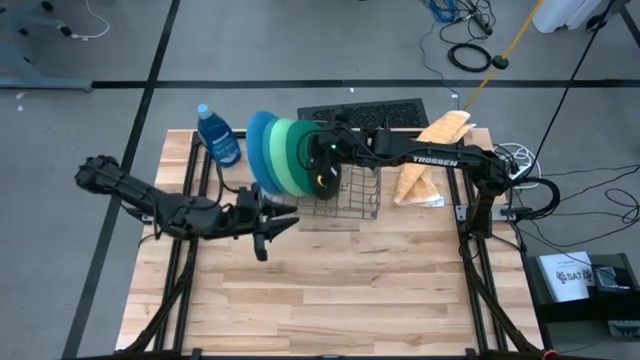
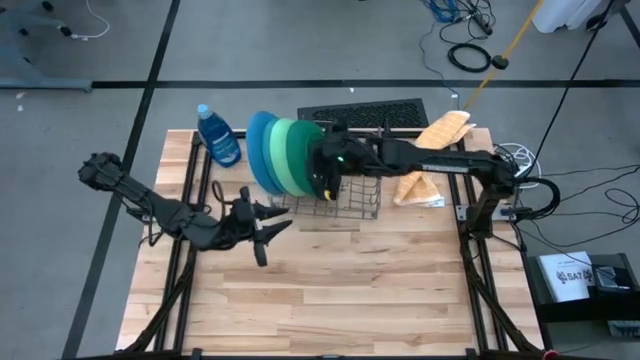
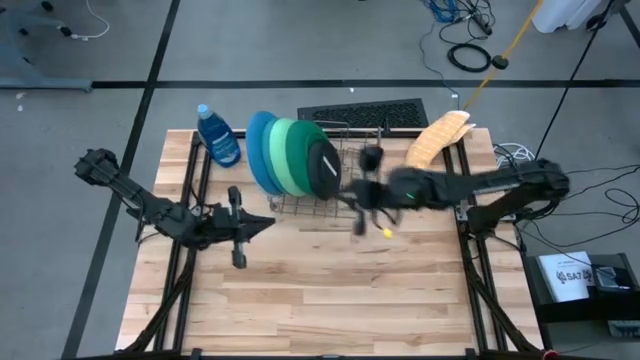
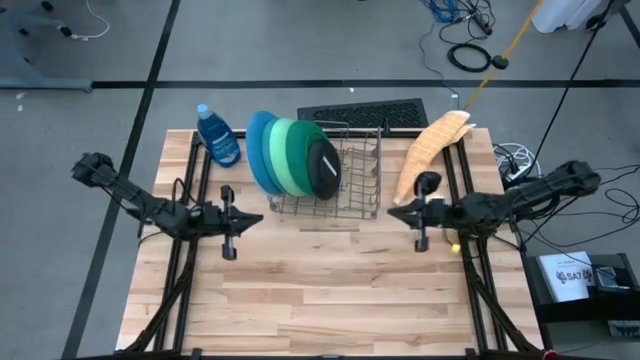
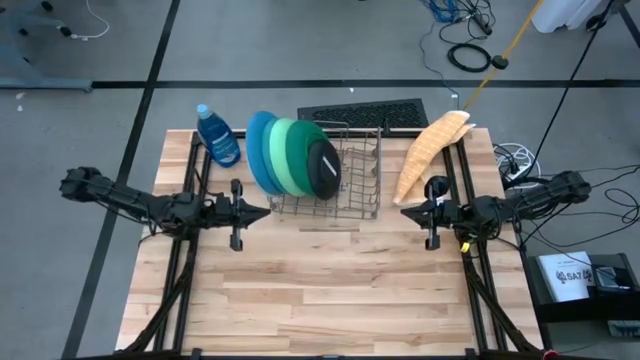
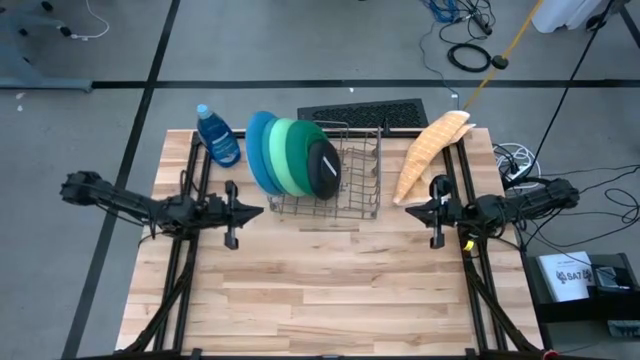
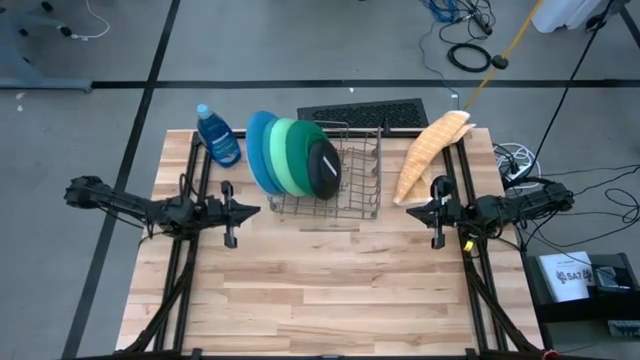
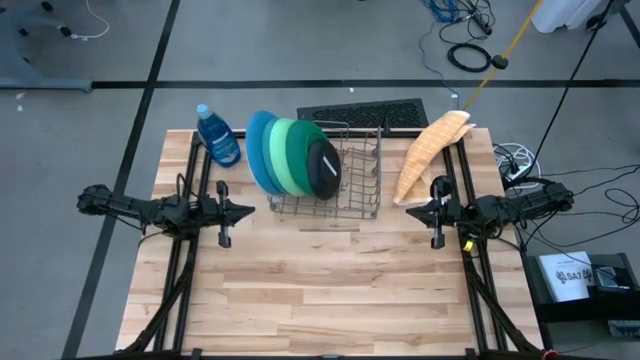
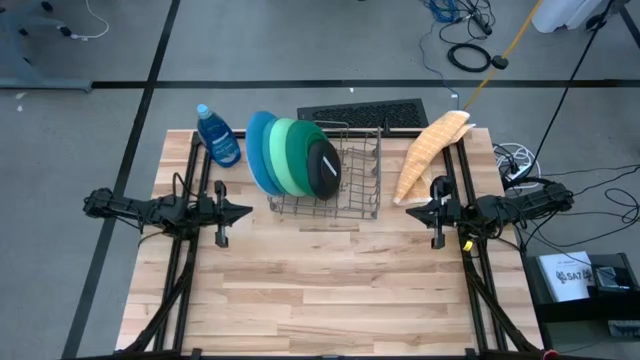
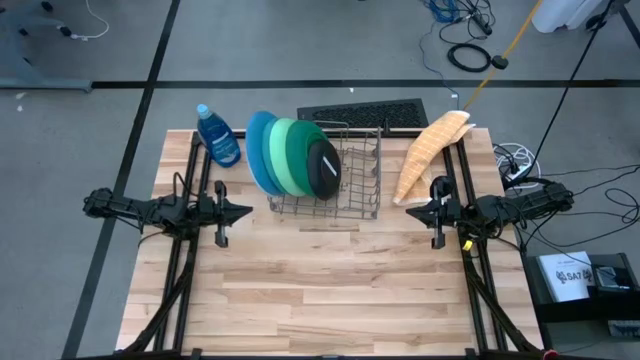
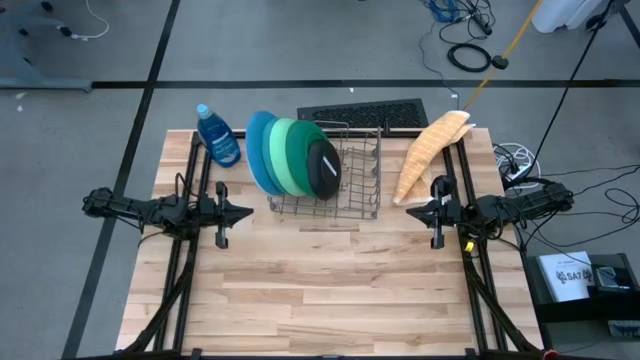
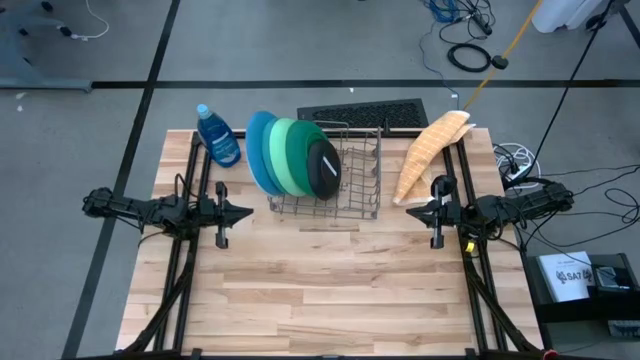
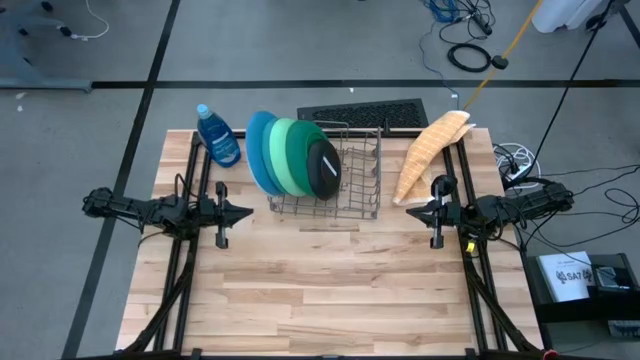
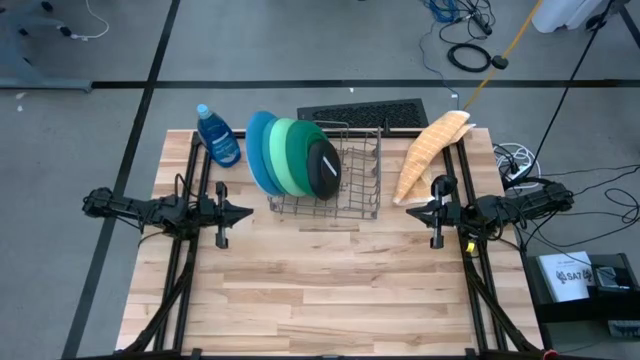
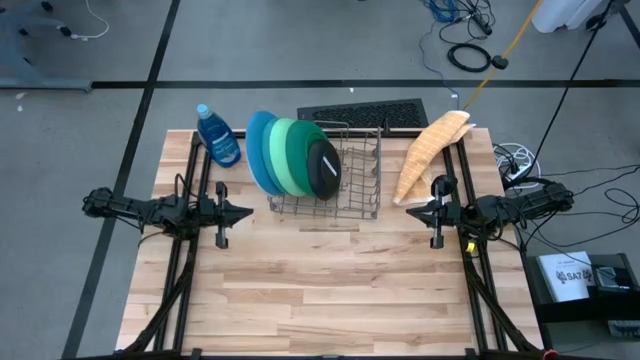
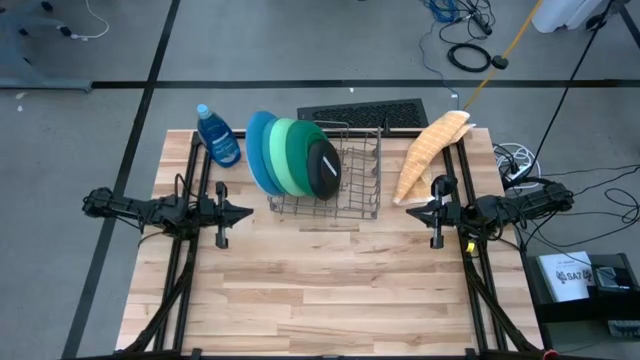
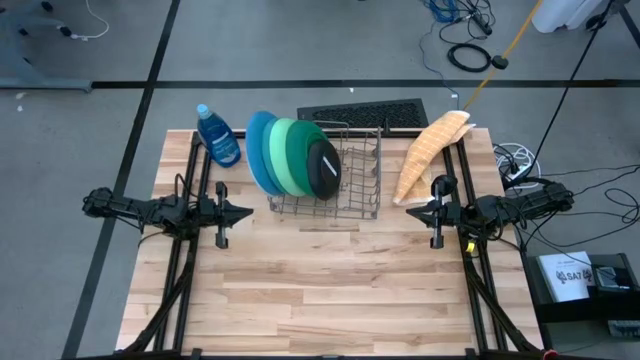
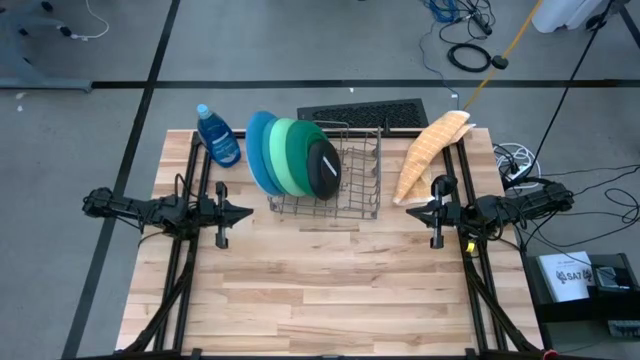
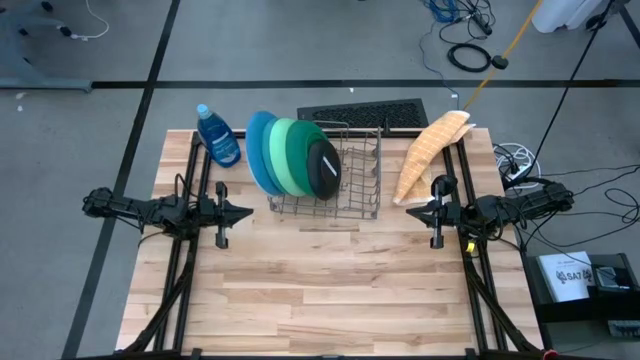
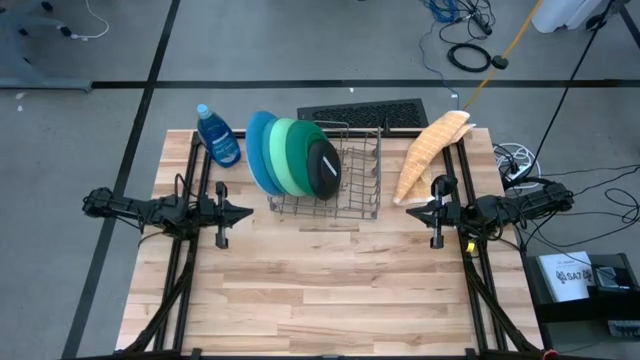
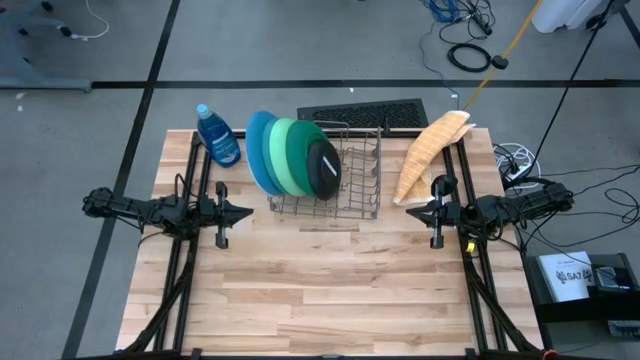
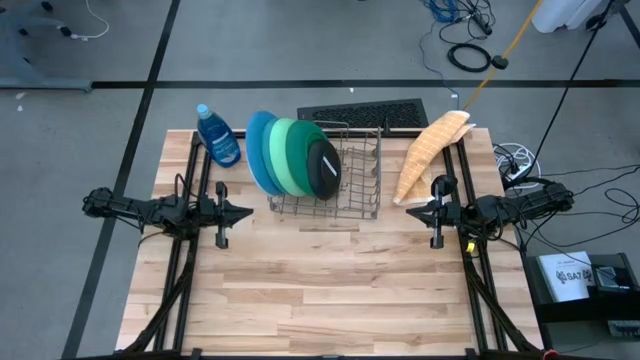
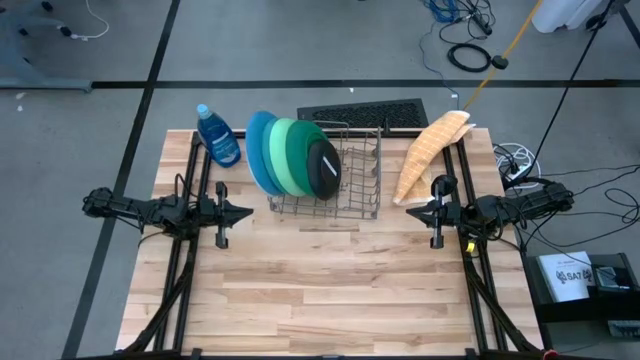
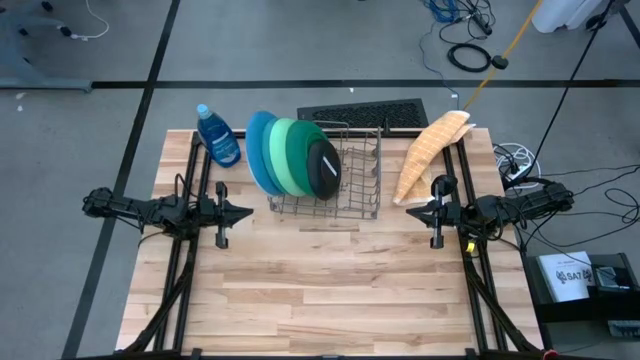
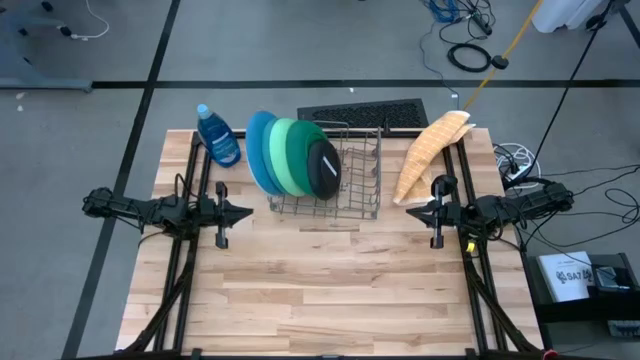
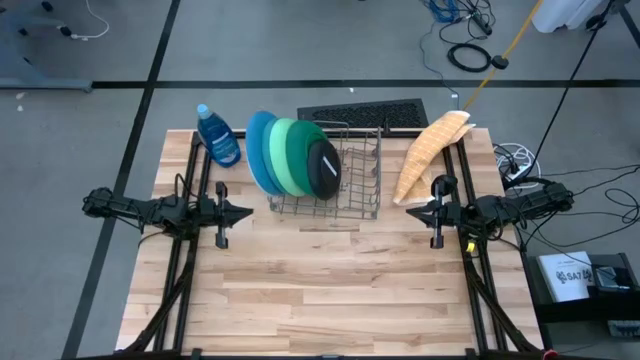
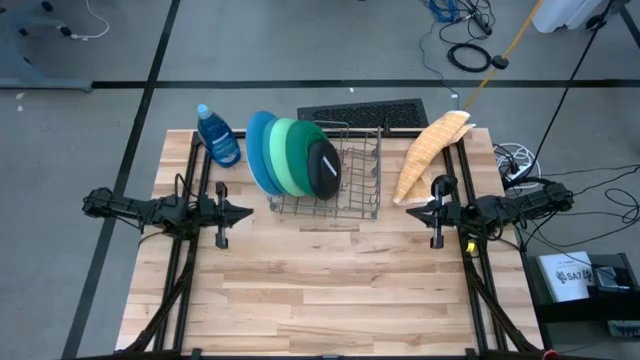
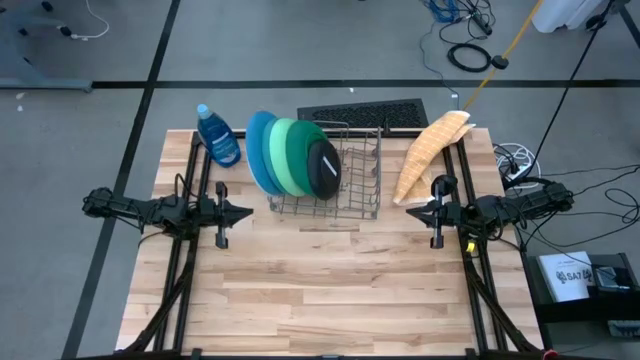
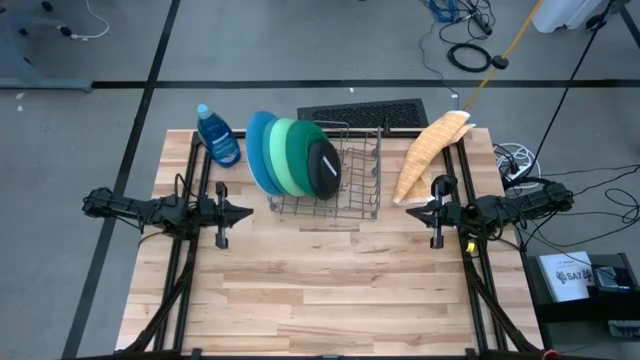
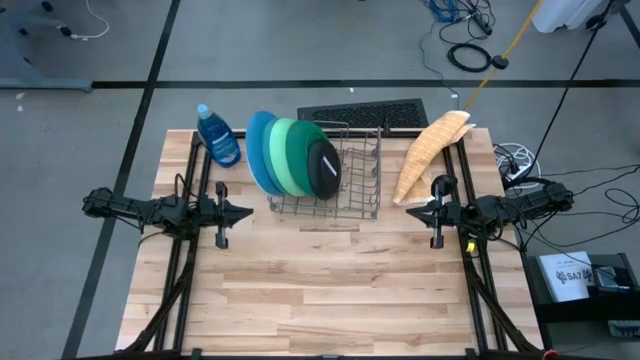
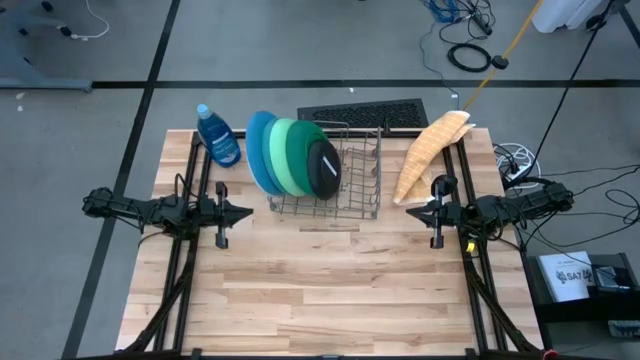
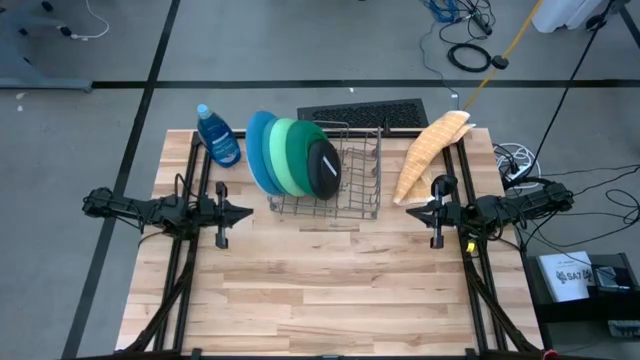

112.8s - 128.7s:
Task: Sort dishes
Return to Home Position

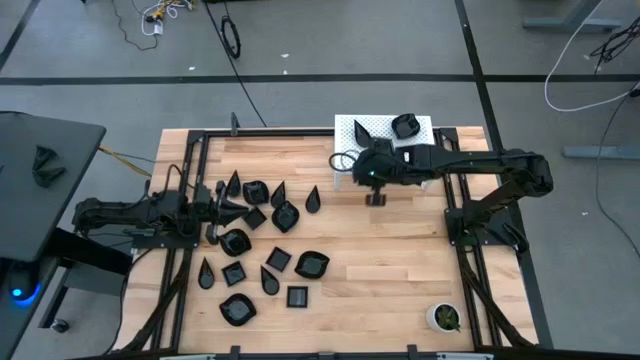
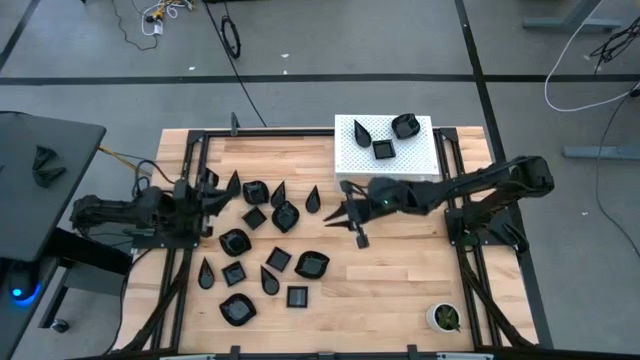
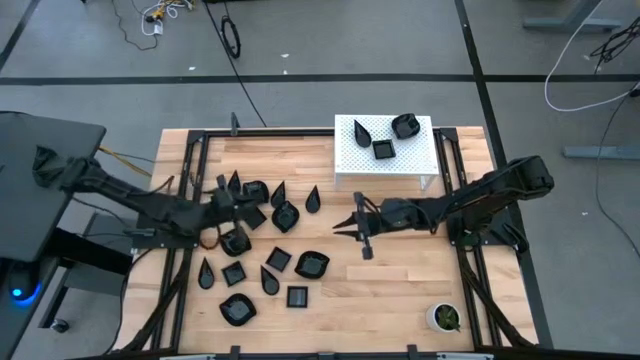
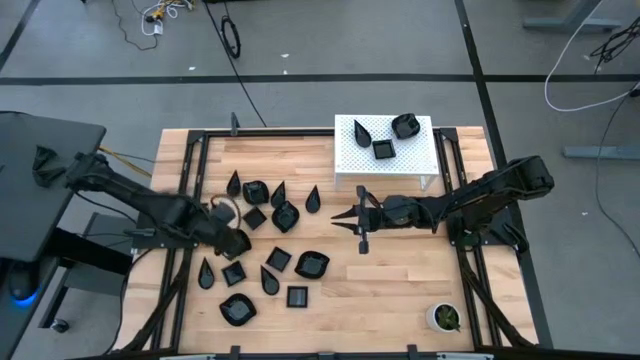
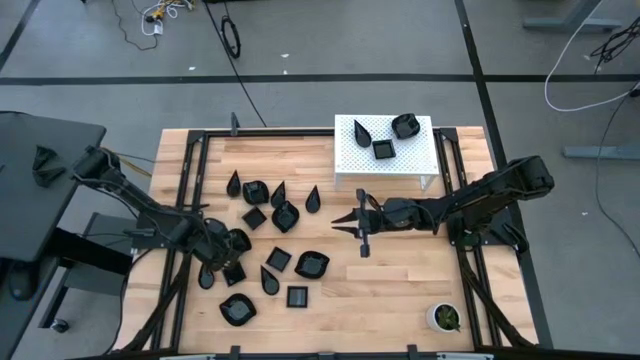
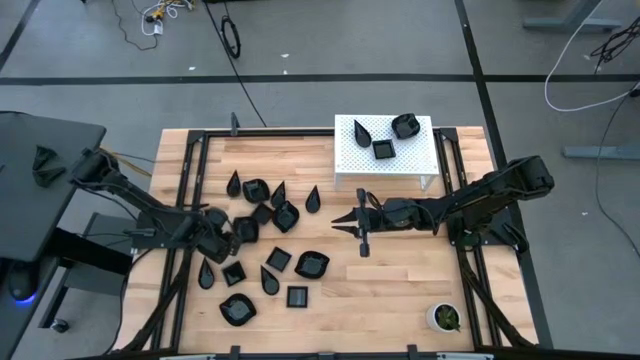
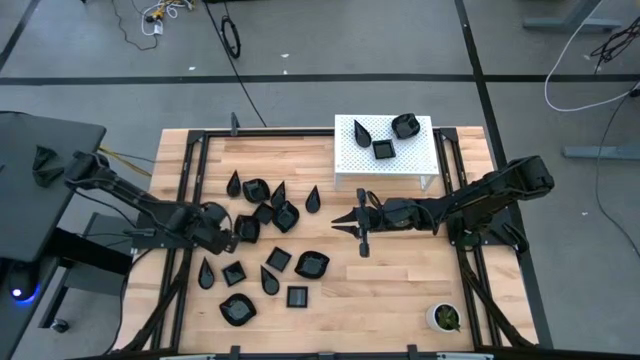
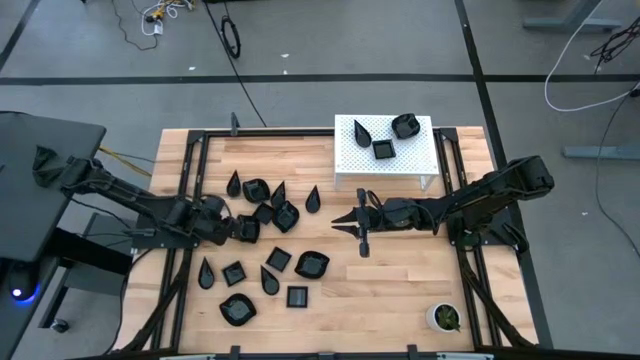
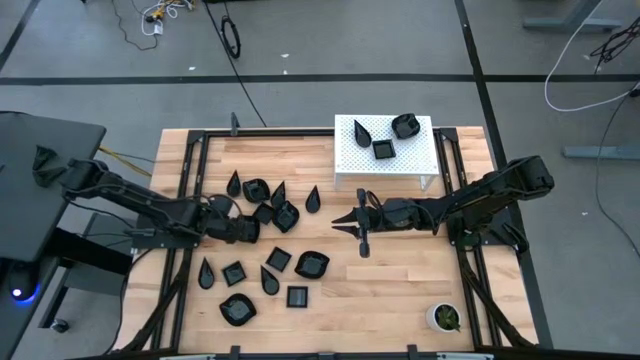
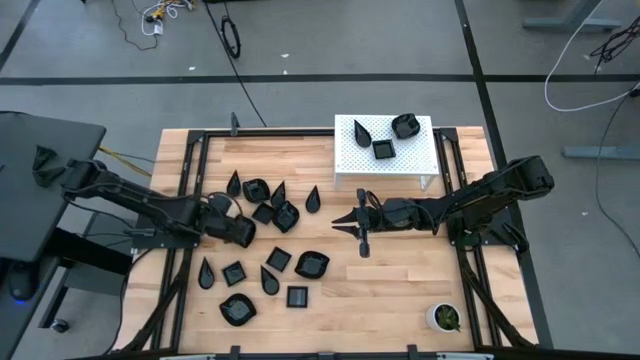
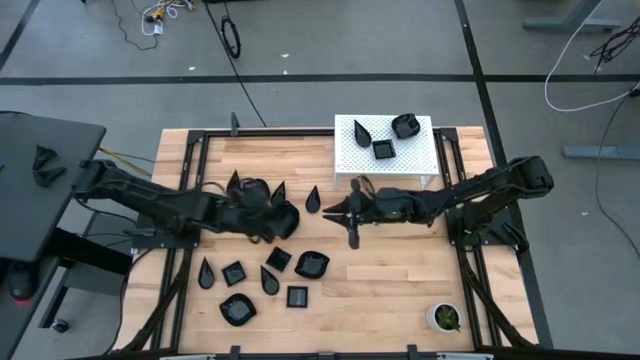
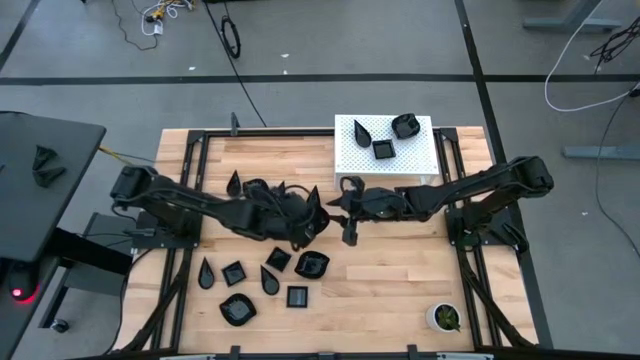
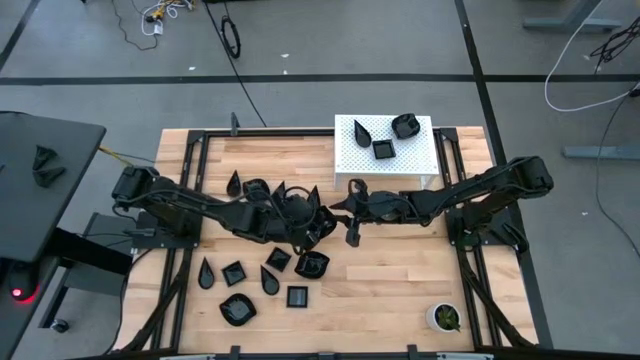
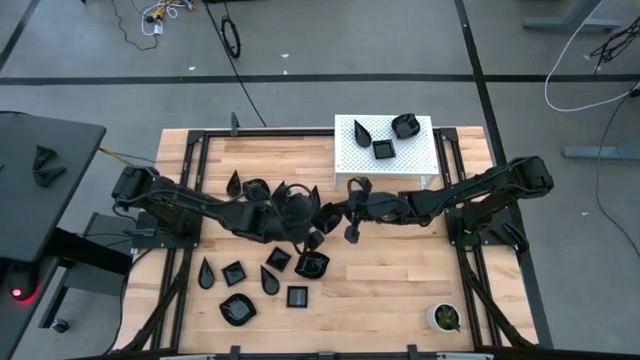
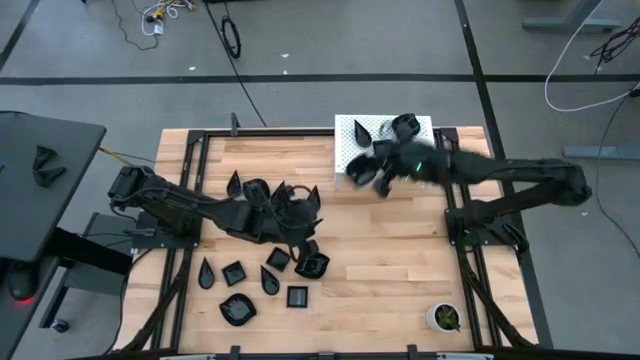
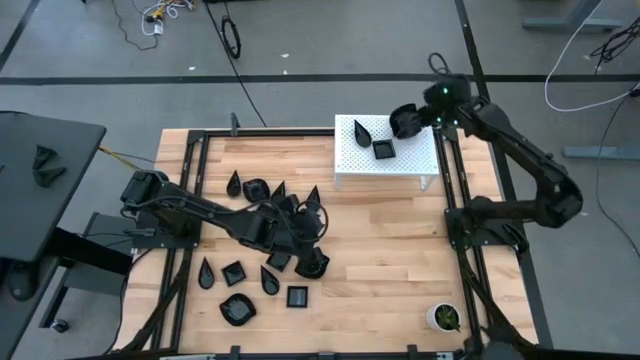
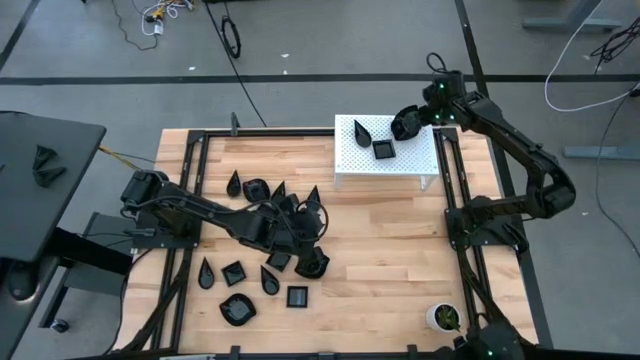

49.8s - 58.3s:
Task: Pick & Place Mini shaped plates
Stack the black leaf shaped plate on the black leaf shaped plate on the shelf
